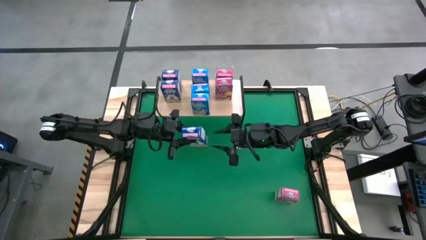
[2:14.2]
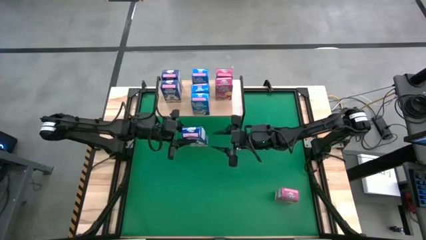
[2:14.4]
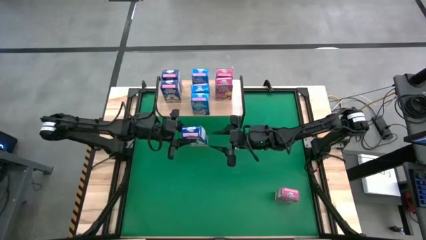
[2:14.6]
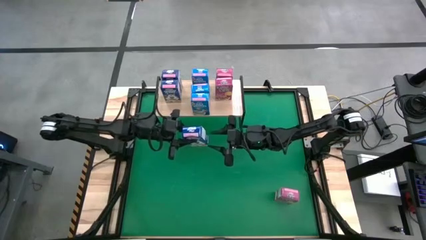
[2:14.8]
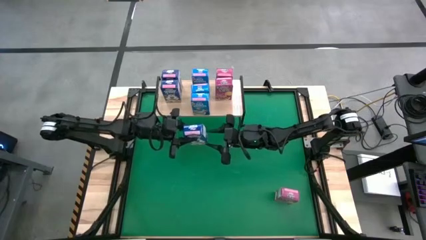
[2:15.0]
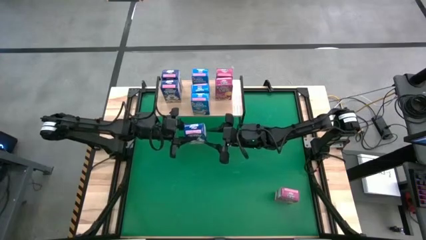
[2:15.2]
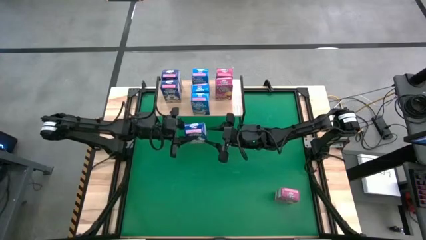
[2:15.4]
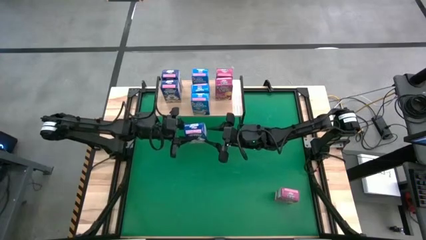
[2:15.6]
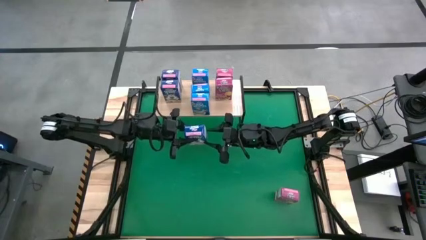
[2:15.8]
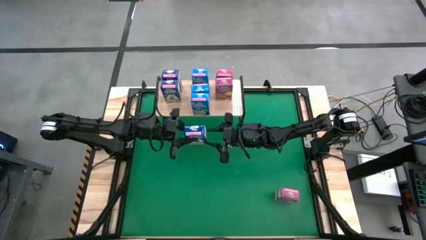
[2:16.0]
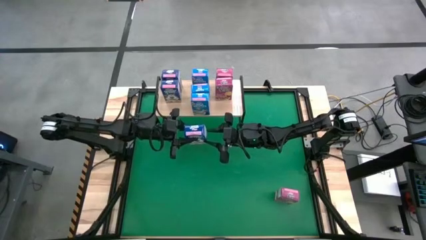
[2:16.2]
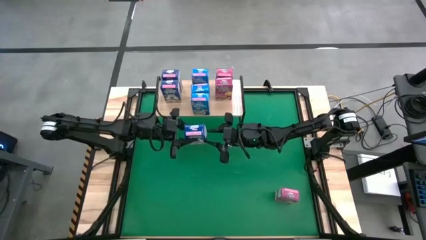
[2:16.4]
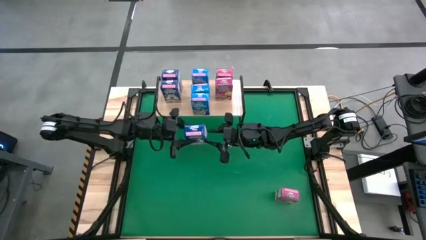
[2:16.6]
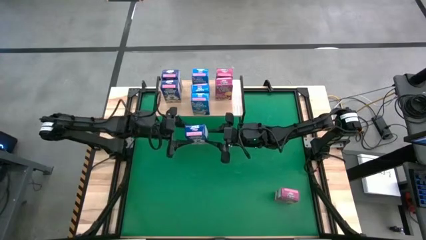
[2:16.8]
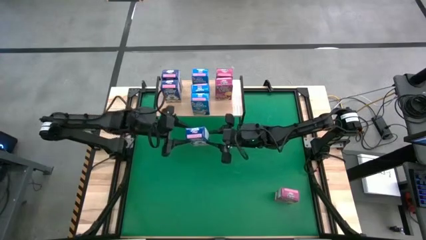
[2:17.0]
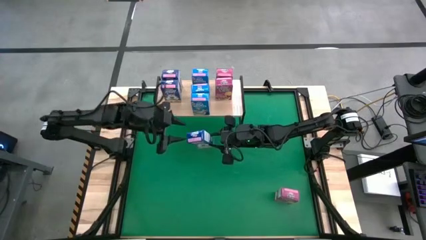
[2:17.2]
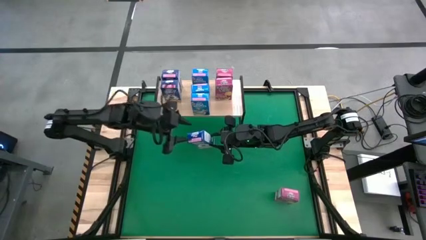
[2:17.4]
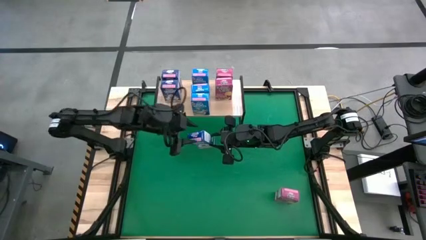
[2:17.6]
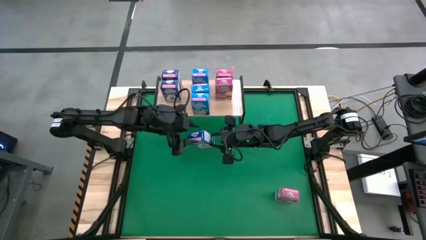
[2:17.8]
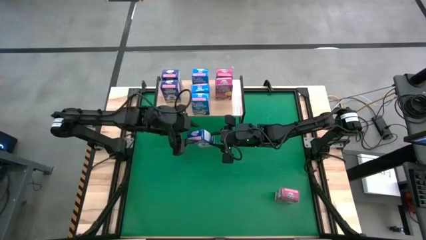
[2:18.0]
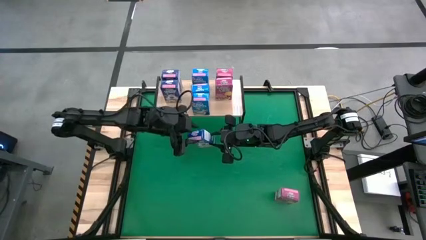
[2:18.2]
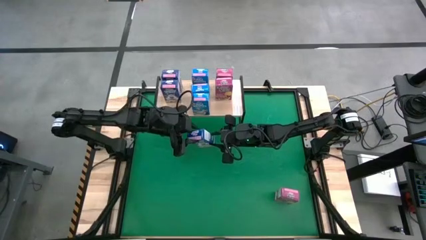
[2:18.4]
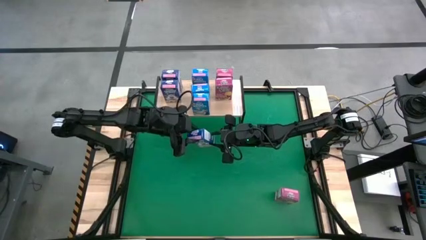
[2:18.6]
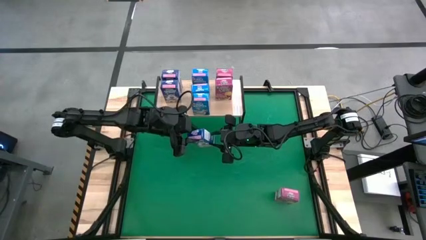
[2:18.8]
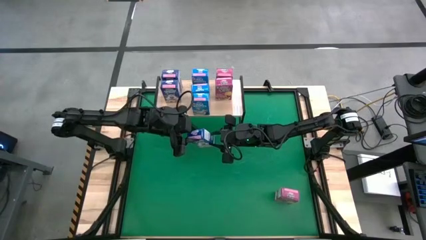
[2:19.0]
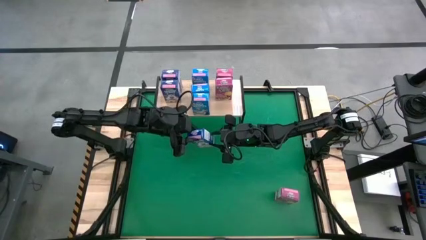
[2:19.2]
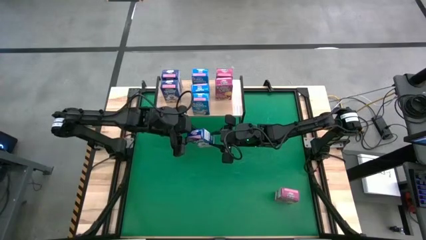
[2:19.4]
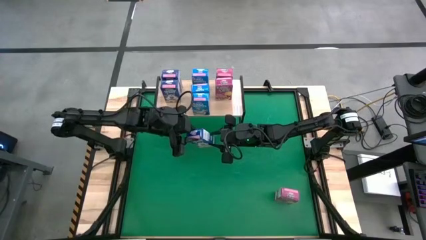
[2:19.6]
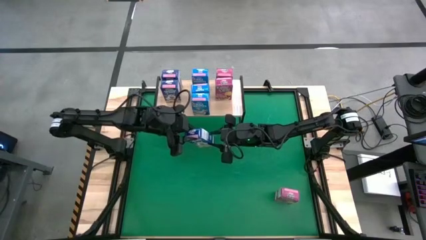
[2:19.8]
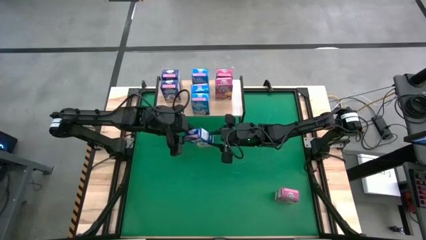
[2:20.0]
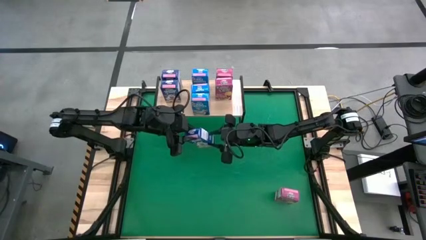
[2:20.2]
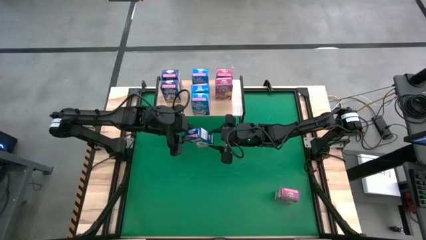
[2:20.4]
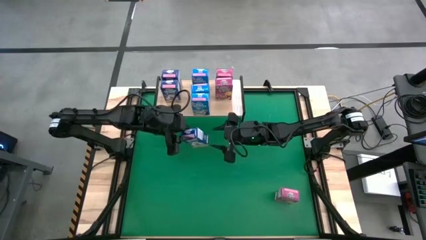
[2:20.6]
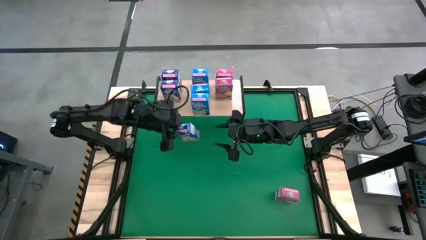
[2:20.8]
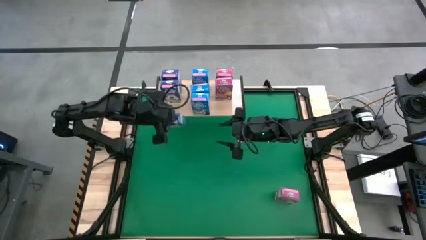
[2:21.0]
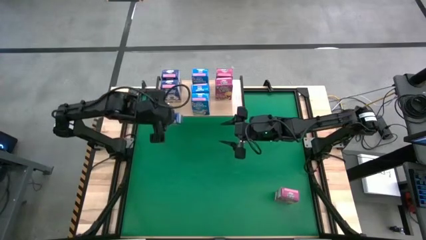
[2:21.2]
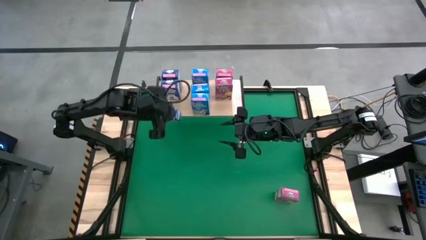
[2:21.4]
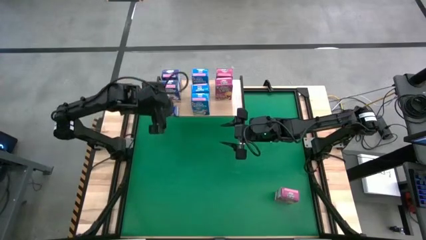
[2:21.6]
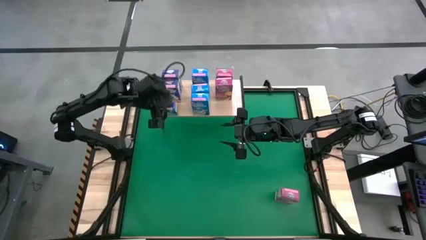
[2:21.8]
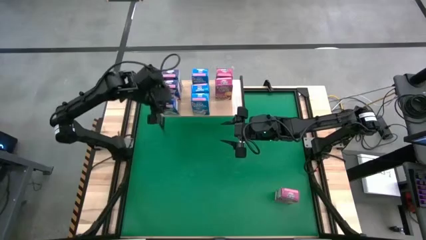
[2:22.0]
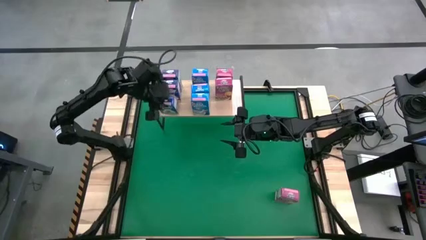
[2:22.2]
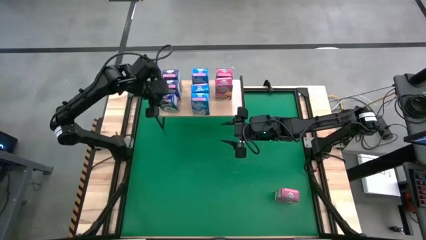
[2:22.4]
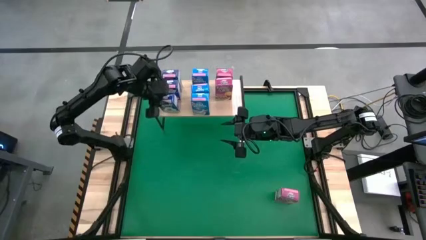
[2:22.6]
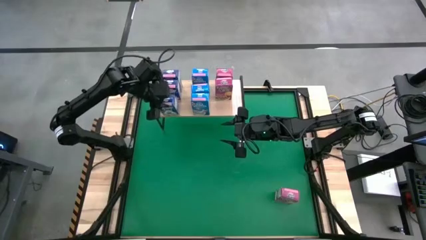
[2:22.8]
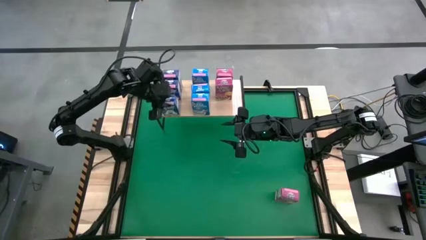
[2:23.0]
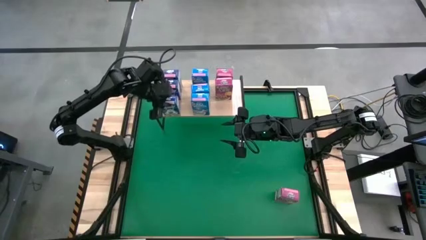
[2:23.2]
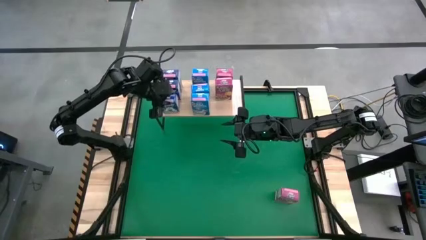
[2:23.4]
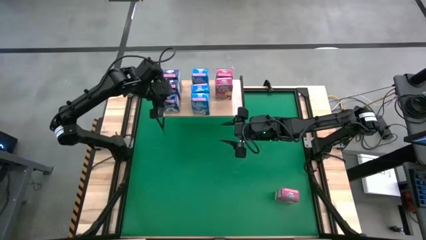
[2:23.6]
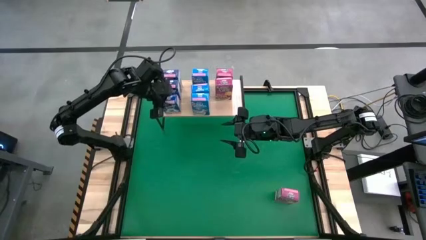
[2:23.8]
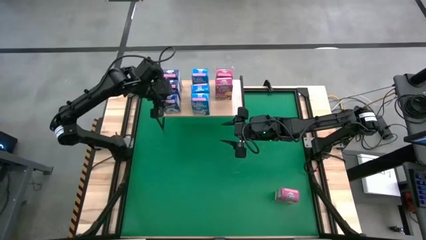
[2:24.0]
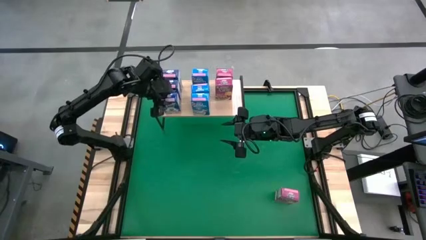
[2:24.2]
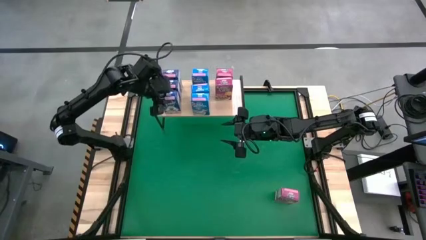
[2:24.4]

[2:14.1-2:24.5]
Task: Stack cereal on shelf
Put the blue cereal box on the shelf aligned with the other blue boxes

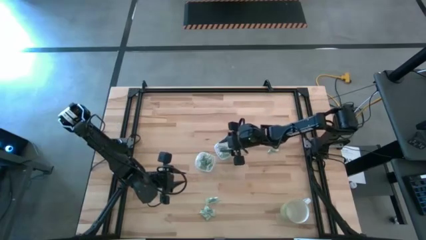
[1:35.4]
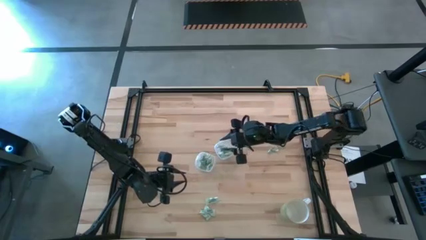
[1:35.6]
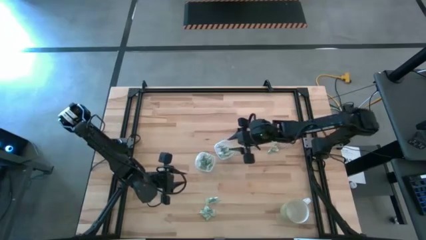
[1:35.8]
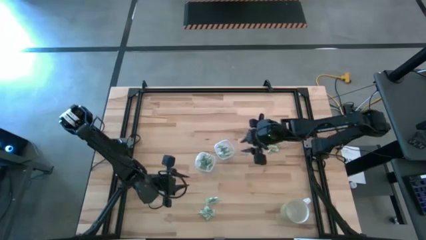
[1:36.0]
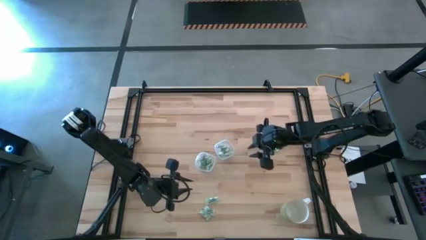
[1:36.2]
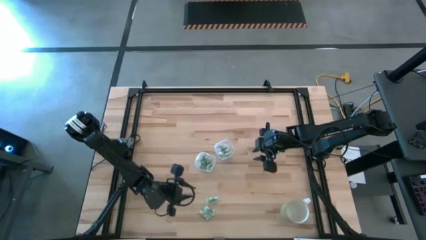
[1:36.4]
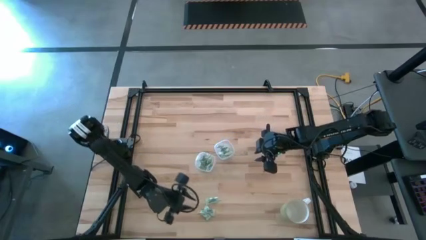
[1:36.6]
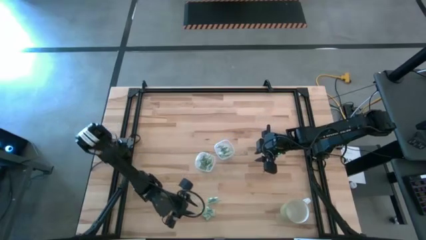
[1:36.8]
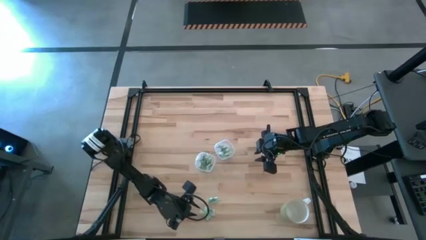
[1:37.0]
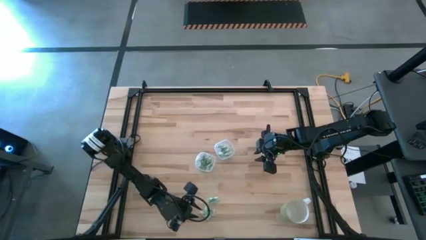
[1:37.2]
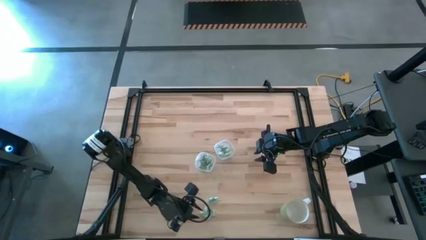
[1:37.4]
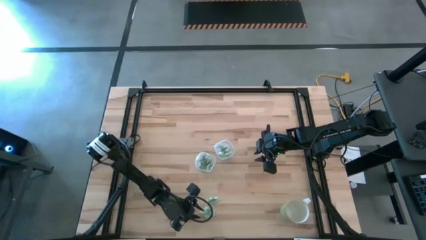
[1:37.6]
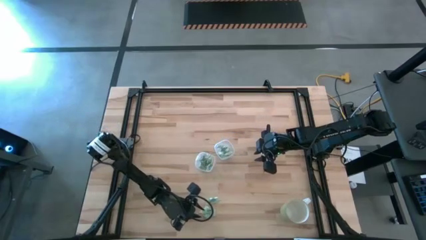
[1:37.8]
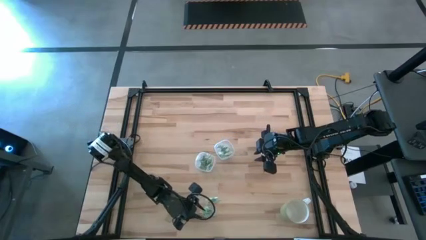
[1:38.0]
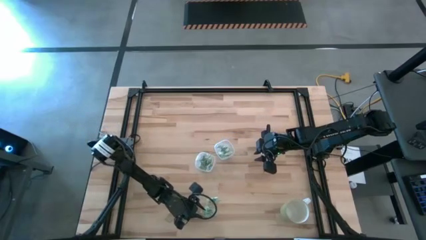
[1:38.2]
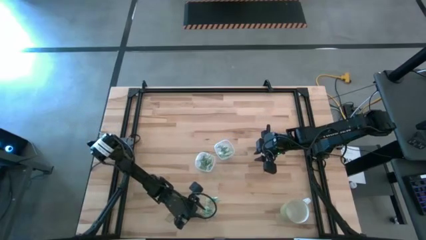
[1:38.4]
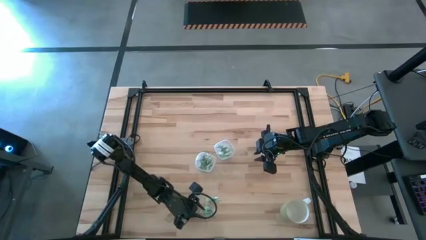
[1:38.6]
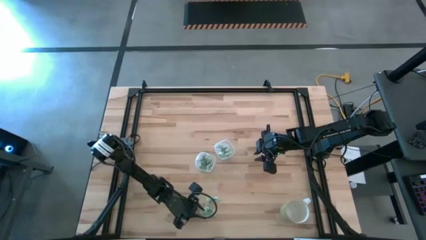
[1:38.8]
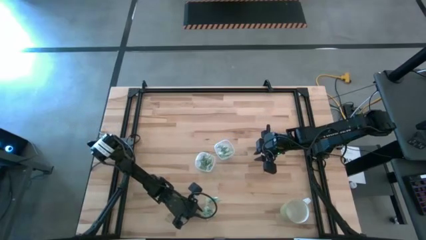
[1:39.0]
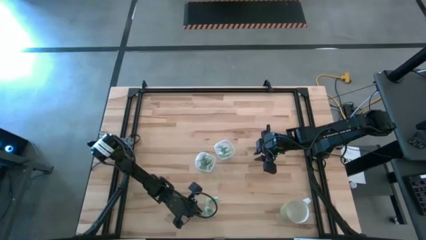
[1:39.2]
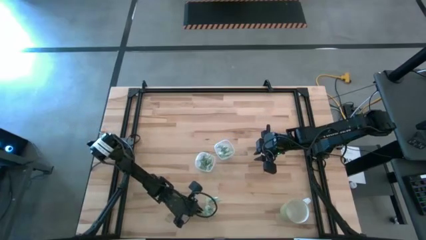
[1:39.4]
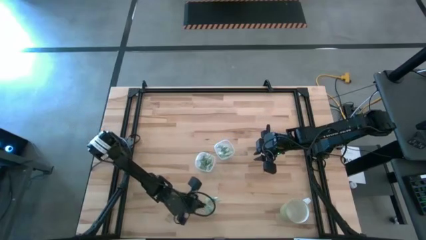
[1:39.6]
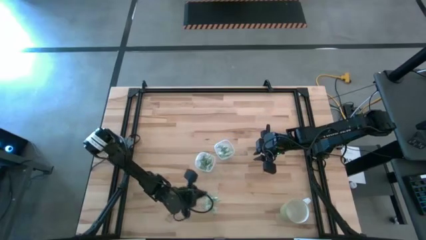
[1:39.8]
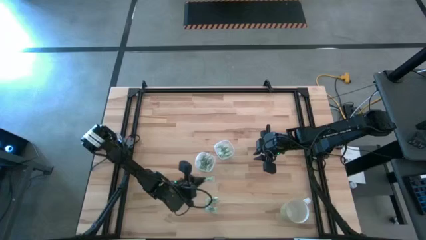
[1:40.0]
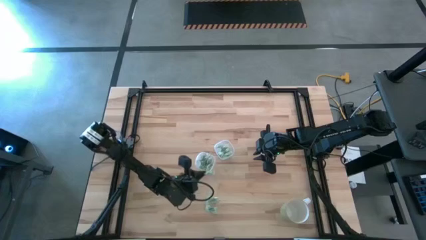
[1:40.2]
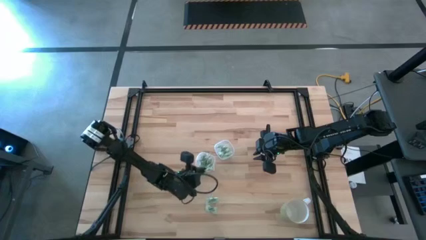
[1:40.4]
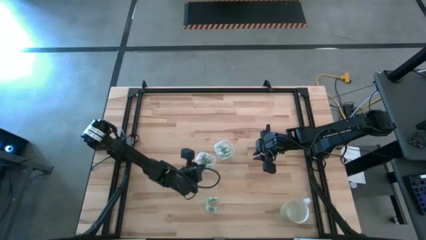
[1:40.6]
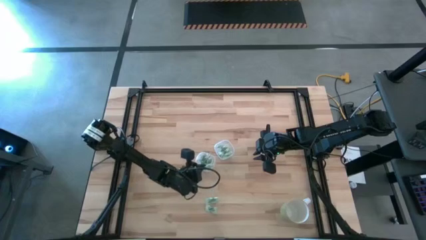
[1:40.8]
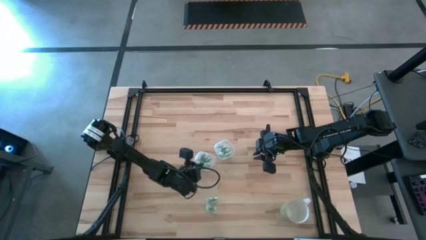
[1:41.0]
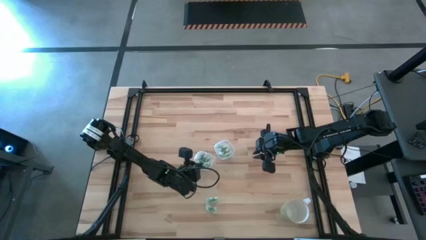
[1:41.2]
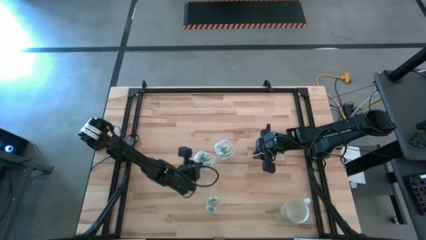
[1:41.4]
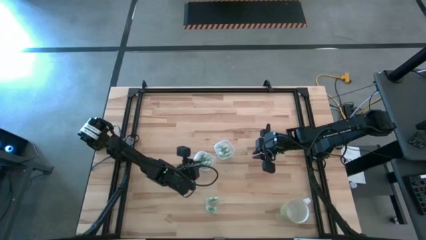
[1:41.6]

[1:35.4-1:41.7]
Task: Pick and place items into bin
Put the stevia packet into the left bin
